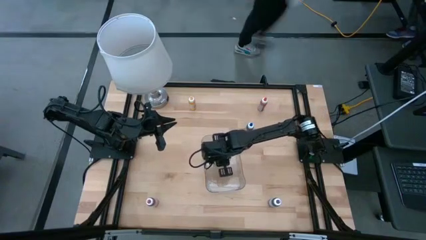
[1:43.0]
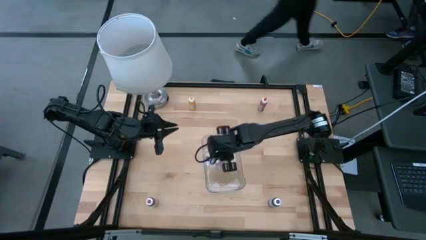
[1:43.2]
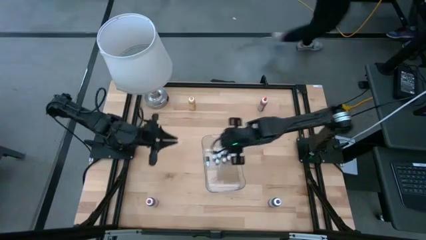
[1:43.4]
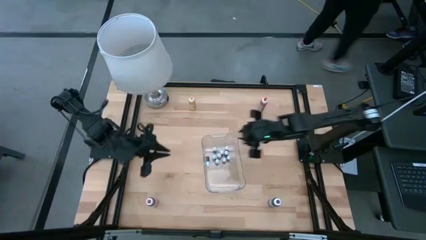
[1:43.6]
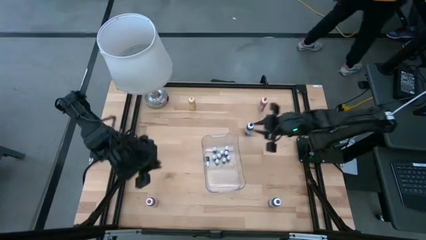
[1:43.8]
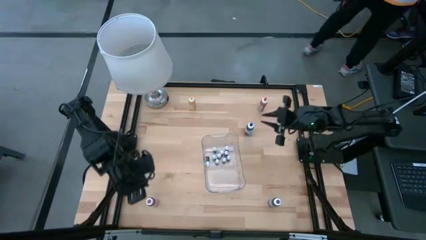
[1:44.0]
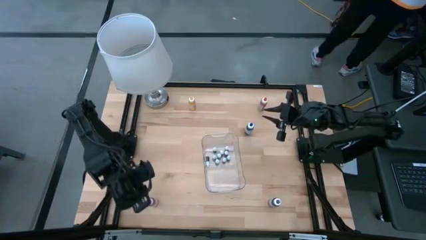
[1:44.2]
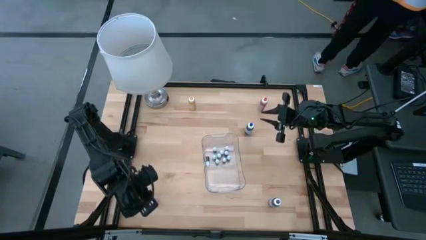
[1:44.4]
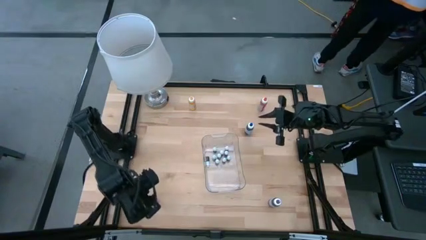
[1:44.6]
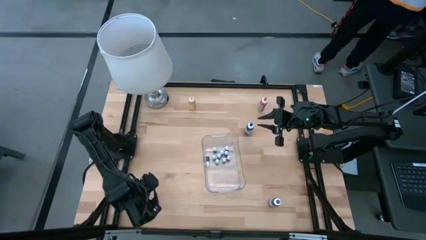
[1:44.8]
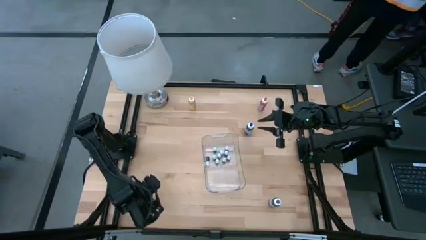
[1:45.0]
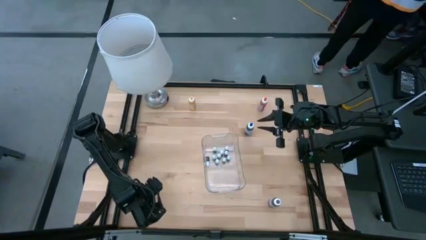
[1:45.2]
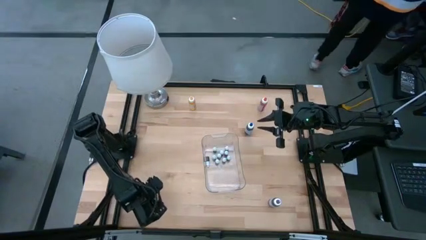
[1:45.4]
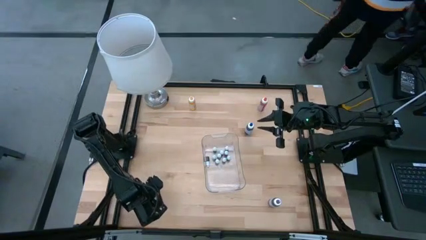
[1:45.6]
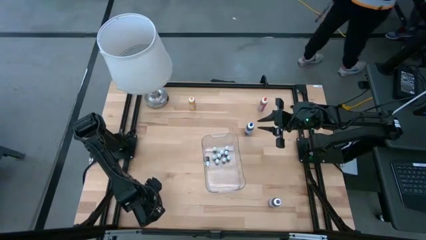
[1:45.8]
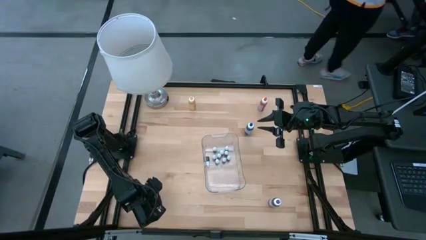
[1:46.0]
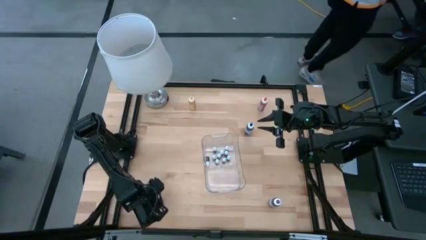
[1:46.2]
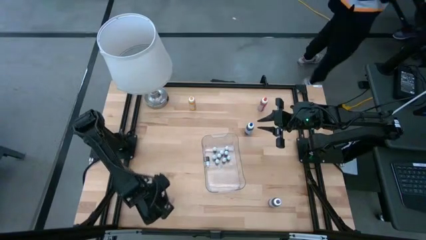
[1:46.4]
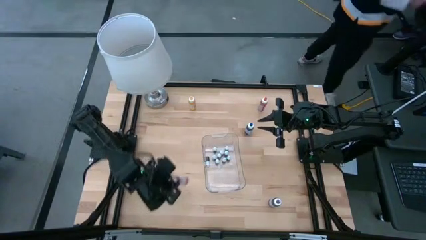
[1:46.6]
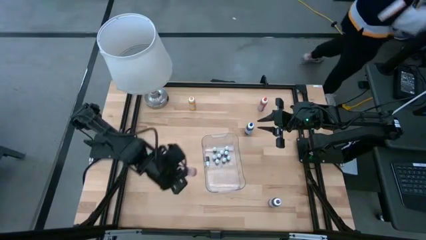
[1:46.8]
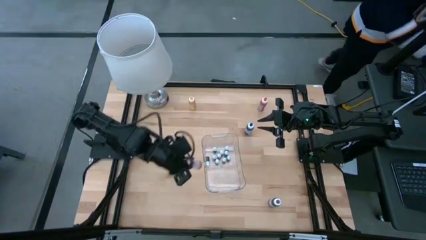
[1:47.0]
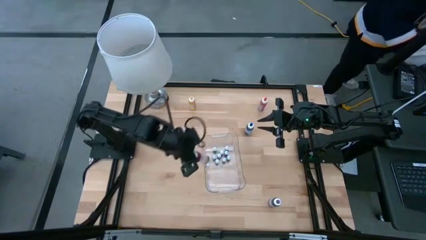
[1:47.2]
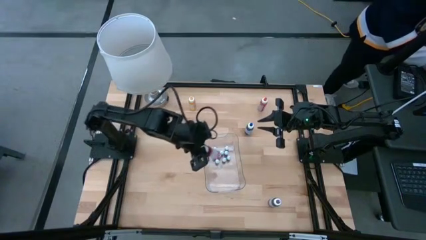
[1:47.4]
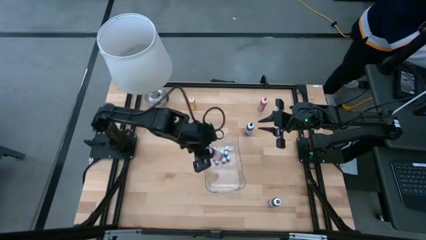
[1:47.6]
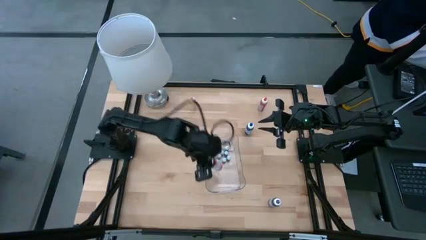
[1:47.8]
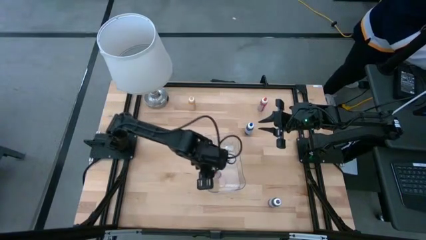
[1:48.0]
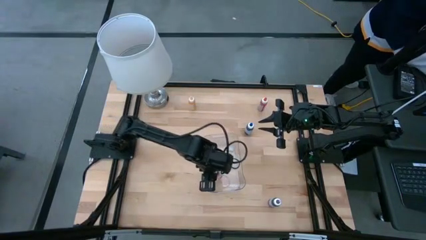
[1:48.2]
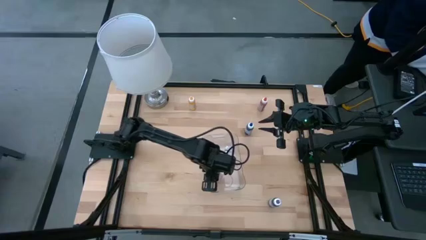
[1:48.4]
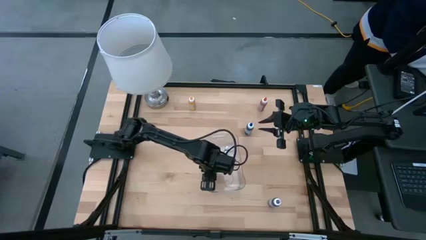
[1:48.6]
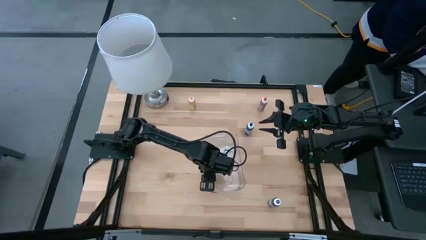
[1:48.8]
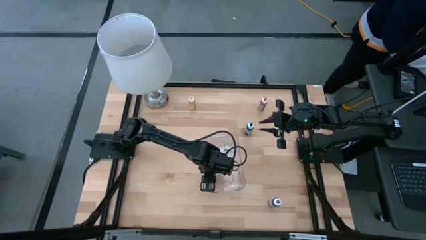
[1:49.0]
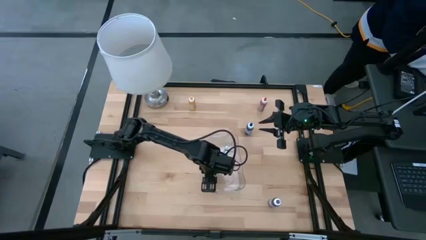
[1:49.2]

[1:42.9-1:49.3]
Task: Pick & Place food coloring
Put the large pink food coloring bottle into the transparent container

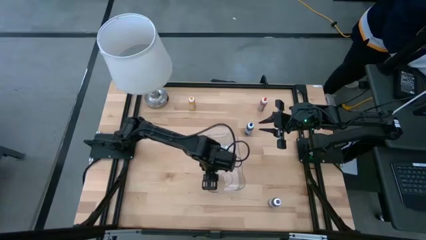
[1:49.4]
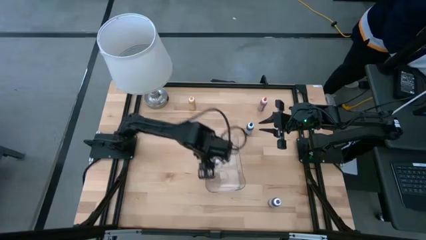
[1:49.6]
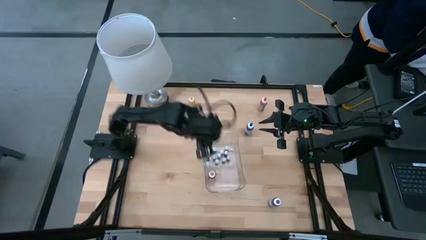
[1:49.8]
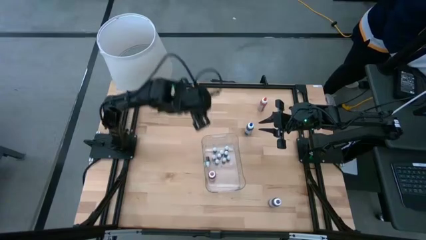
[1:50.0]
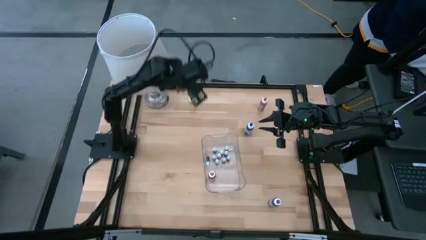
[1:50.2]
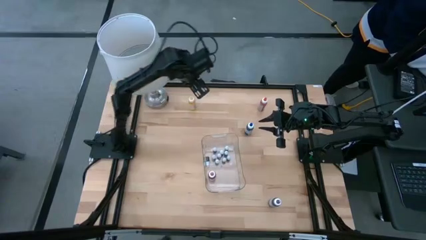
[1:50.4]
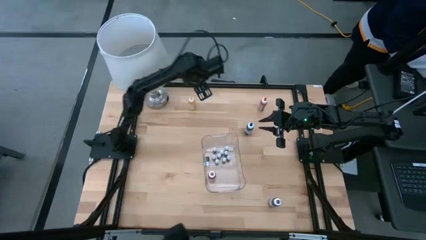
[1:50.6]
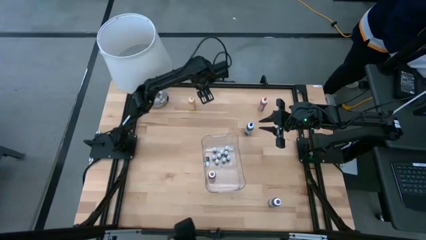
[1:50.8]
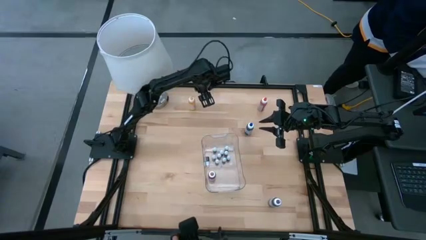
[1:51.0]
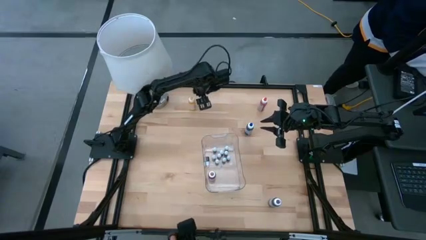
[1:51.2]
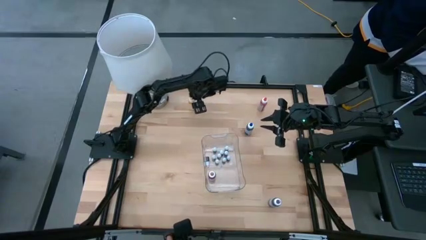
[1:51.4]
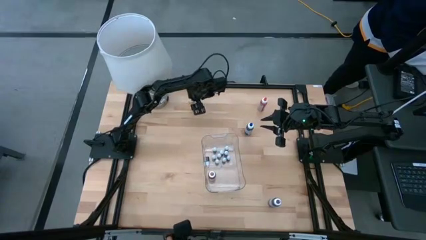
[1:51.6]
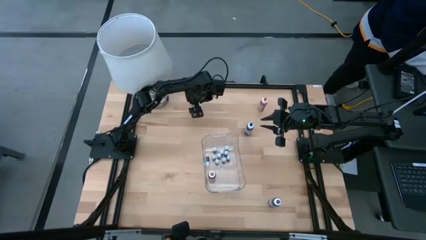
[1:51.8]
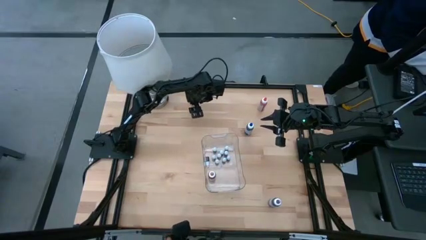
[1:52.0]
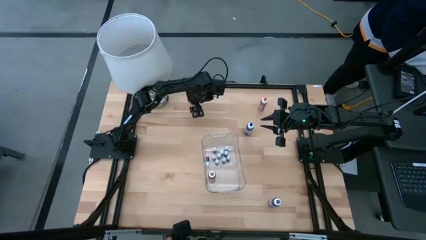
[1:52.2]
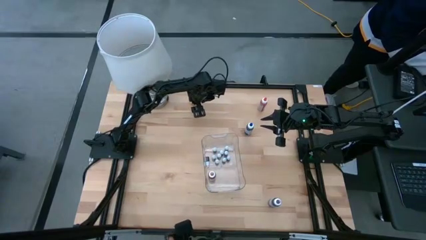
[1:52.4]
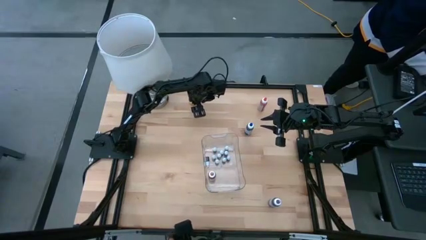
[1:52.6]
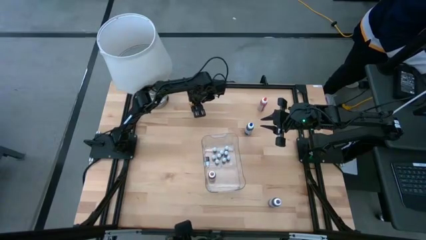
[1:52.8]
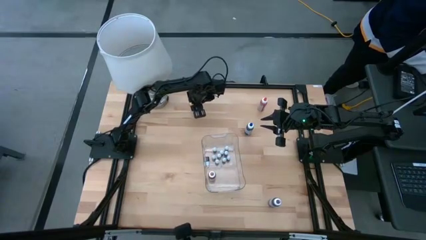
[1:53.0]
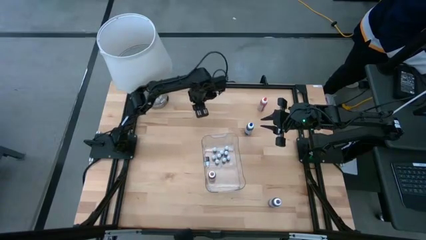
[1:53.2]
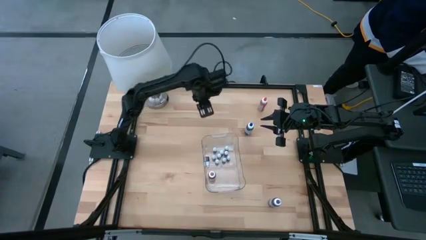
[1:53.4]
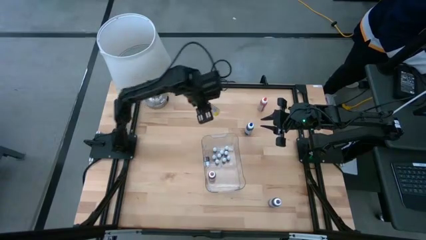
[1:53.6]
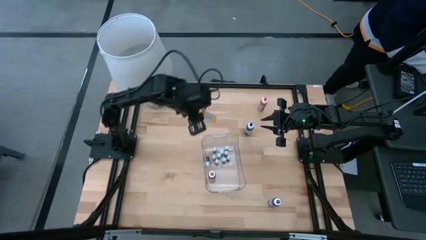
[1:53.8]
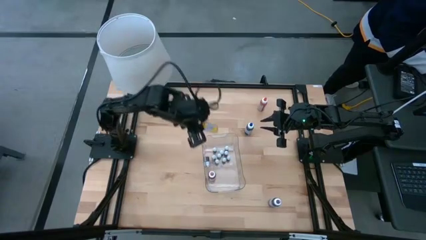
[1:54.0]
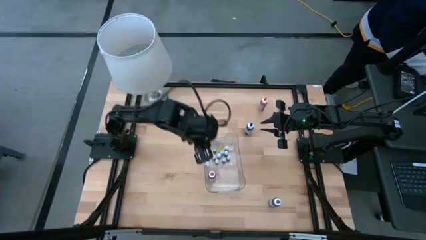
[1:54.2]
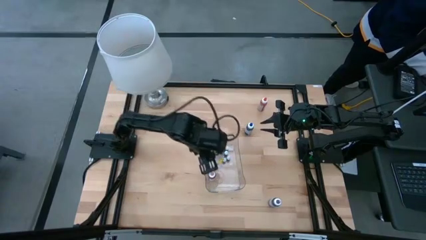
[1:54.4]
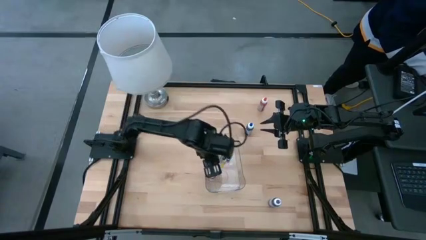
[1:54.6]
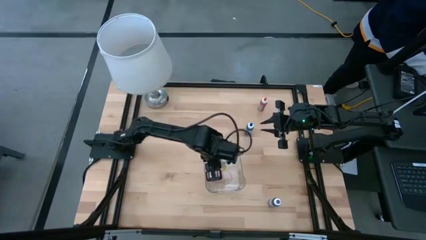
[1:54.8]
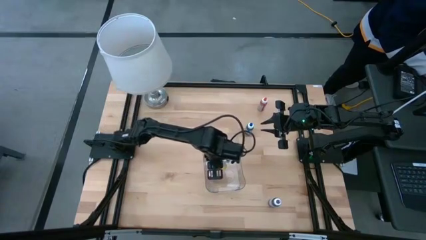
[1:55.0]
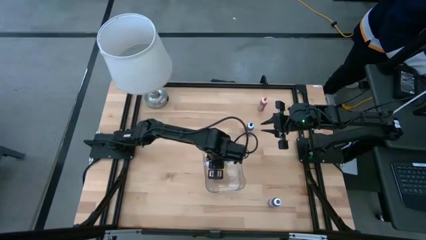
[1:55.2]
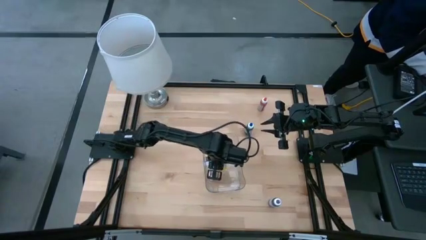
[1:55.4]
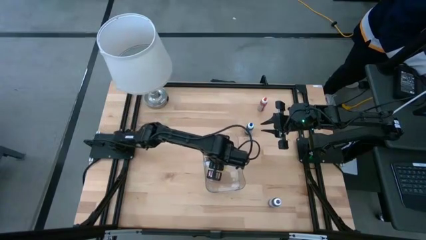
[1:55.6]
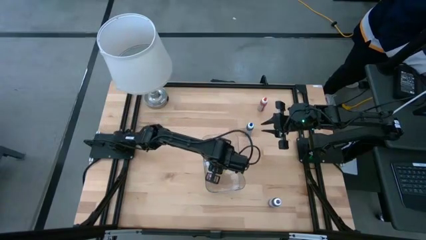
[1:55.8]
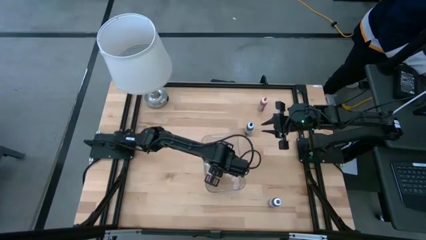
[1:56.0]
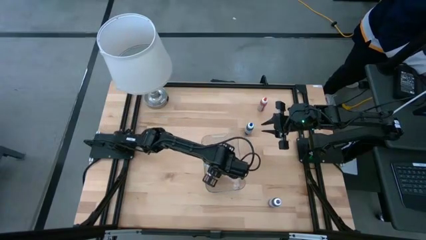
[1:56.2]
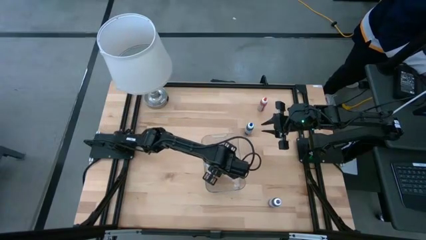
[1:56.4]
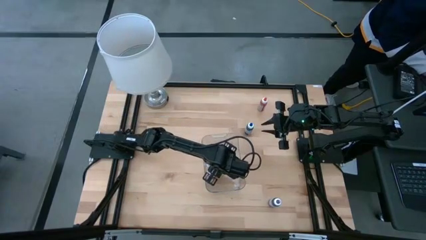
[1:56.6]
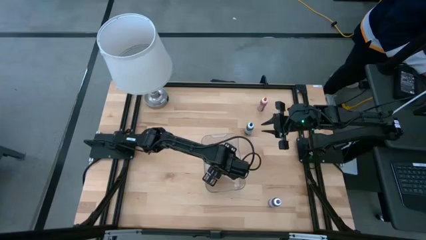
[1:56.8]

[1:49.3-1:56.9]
Put the large yellow coloring bottle into the transparent container

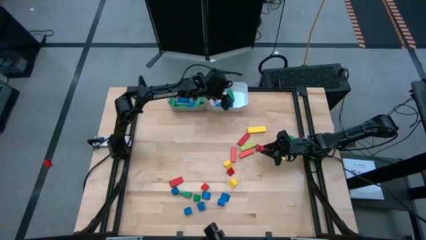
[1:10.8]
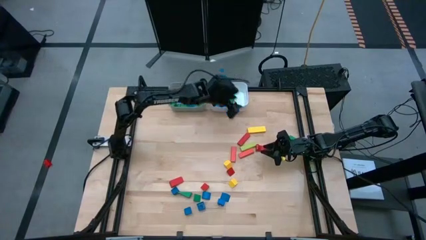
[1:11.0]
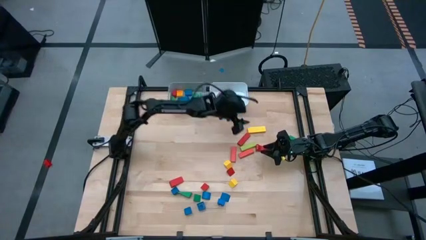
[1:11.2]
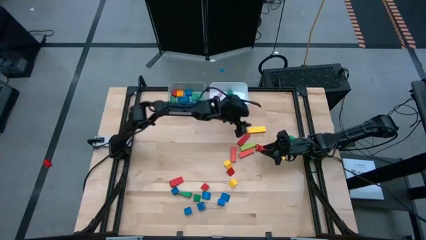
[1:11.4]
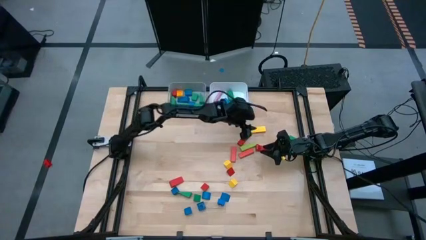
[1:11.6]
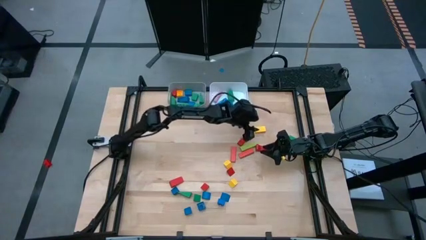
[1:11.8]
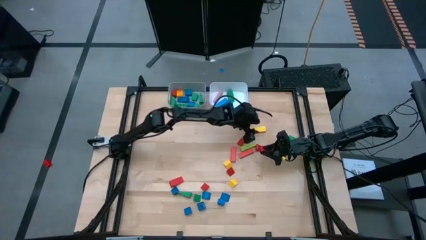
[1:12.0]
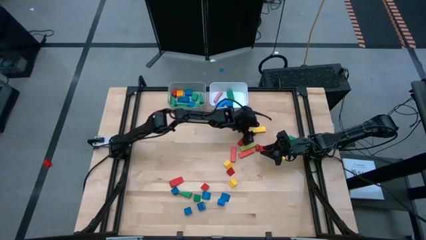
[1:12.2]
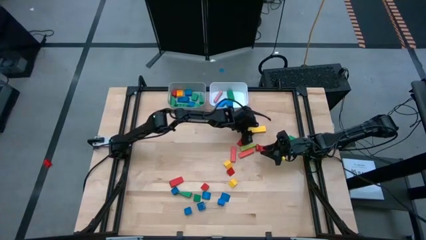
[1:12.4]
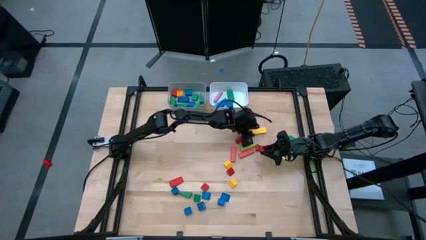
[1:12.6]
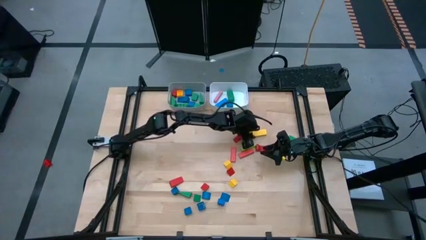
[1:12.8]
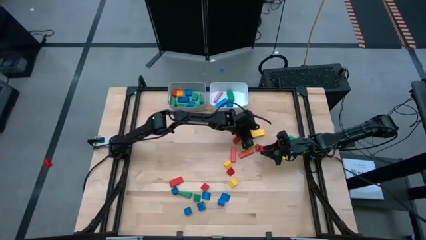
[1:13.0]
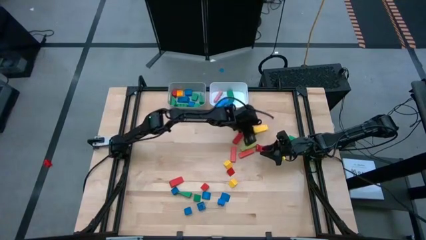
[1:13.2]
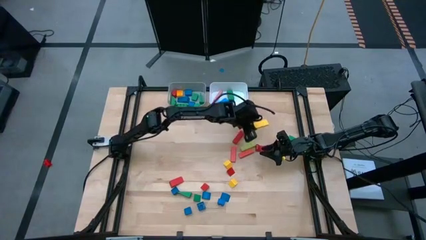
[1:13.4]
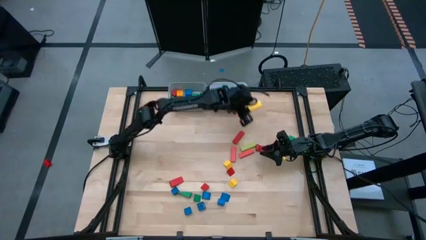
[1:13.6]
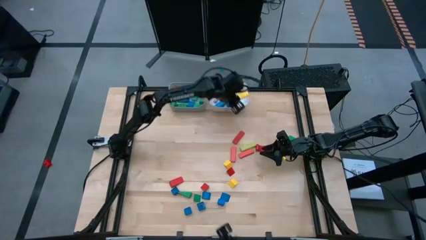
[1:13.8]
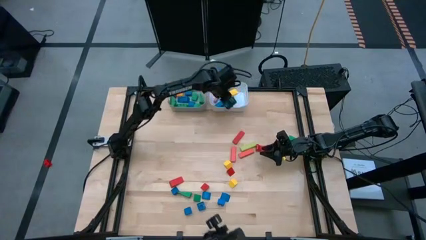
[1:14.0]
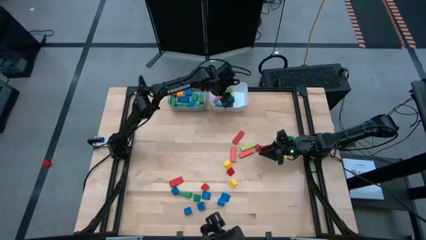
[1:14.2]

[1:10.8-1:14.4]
Task: Sort blocks by size
Put the yellow rectangular block into the white bin
